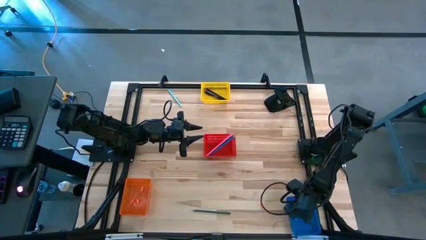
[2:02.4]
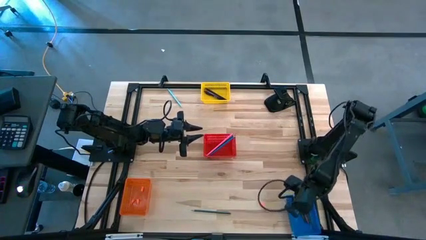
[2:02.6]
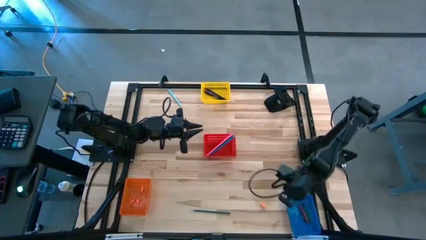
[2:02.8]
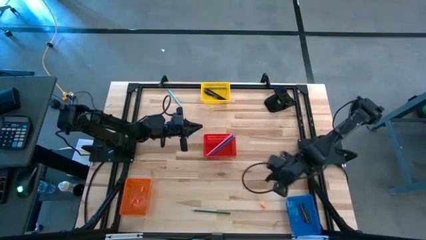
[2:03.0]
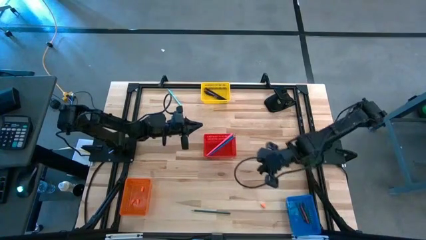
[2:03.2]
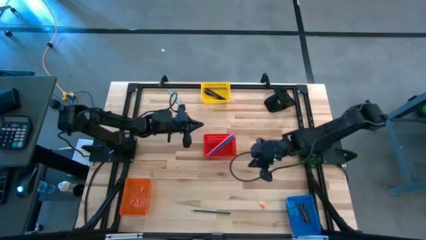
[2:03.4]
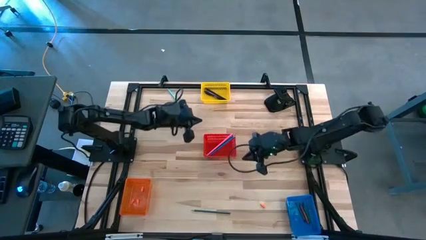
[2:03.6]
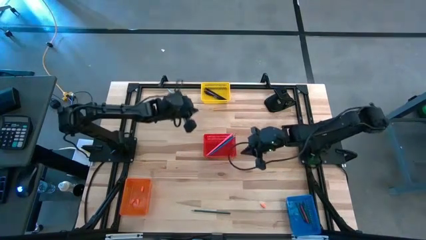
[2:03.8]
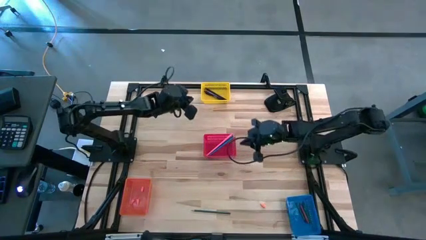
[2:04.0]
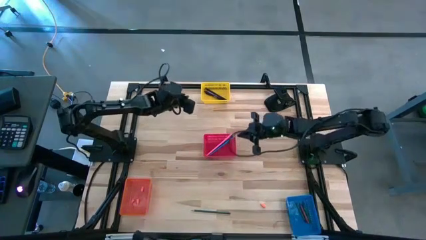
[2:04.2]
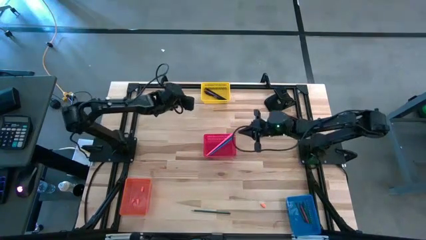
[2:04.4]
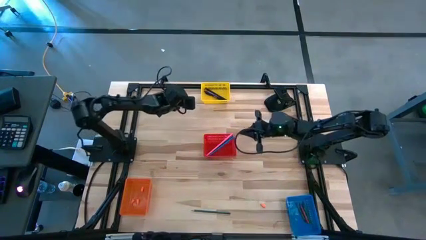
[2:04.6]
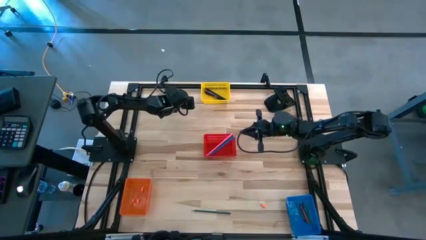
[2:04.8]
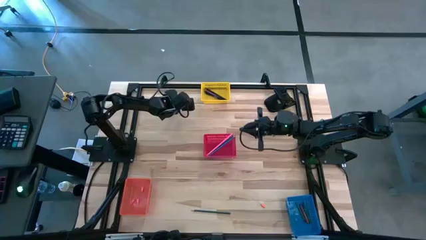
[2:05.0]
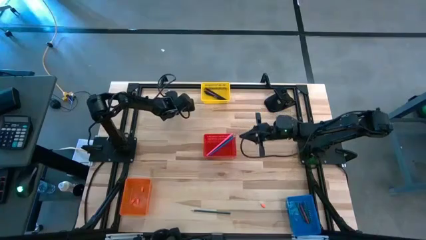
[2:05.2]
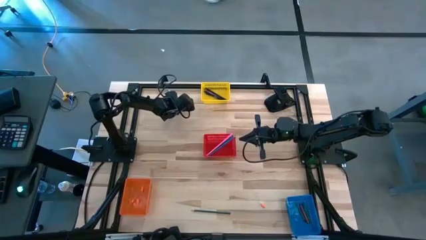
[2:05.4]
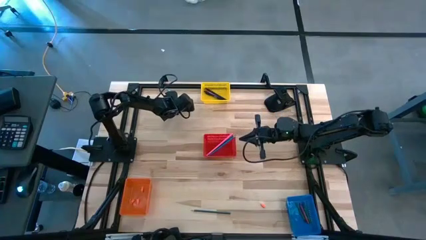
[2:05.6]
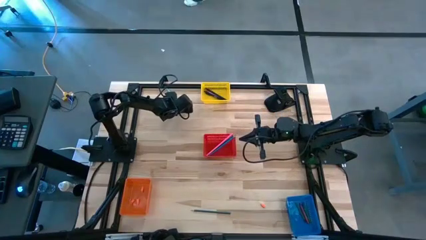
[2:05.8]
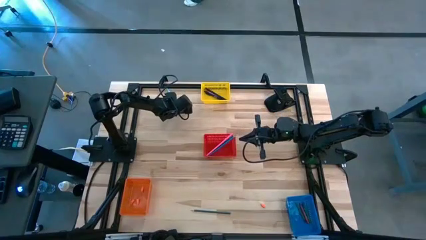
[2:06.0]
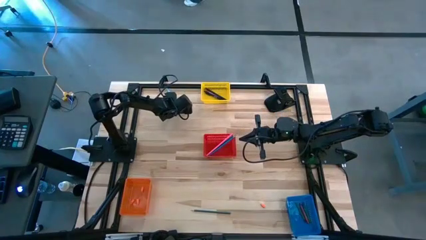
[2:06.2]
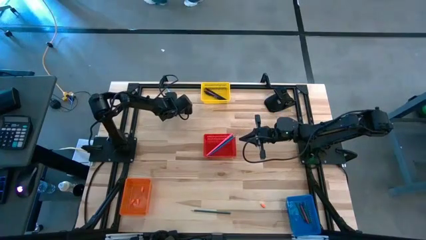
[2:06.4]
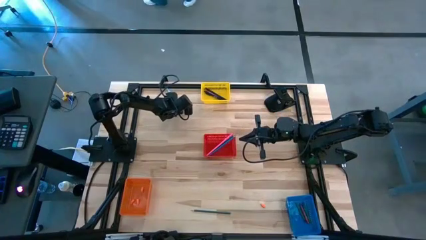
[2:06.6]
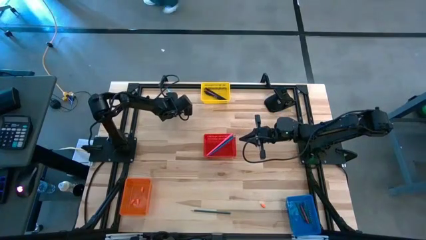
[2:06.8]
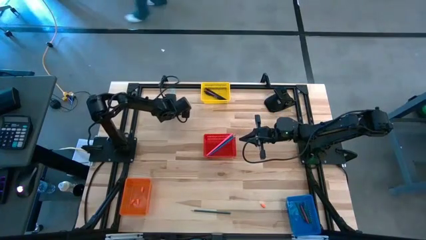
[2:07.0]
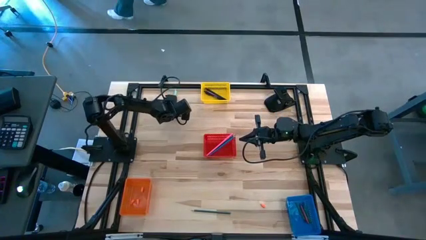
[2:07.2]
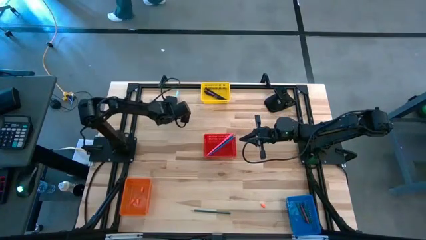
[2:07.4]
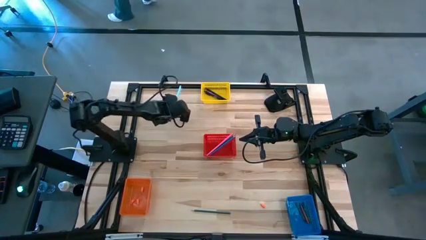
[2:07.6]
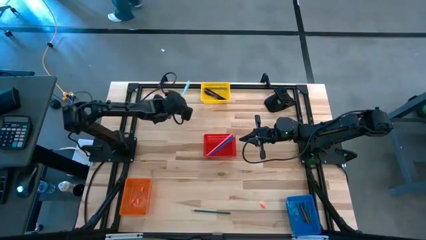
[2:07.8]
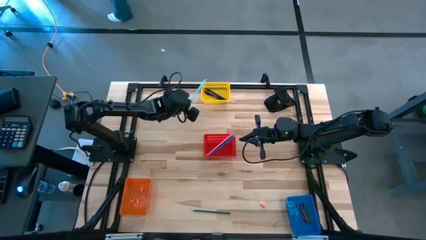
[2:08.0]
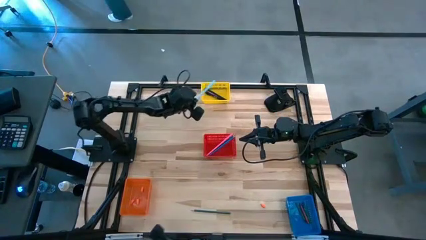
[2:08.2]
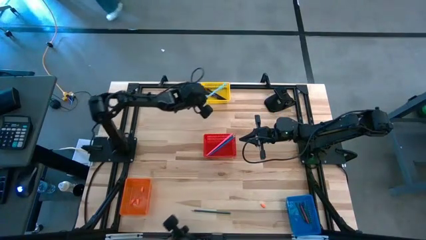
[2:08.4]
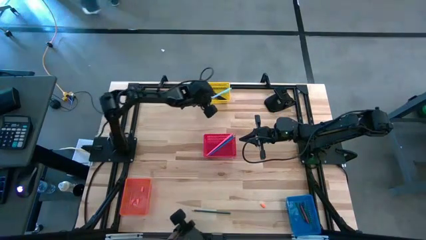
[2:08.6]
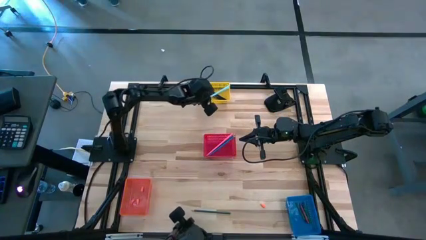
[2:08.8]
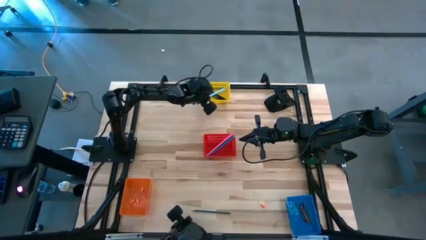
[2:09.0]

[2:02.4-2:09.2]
Task: Sort crayons/erasers/pens/pencils in bins
Put the light blue ball pen into the yellow bin

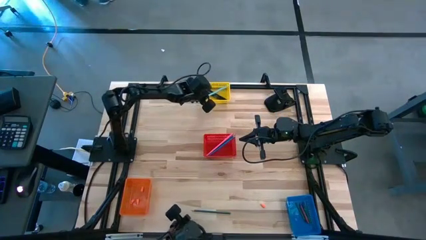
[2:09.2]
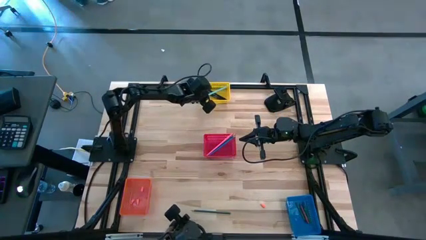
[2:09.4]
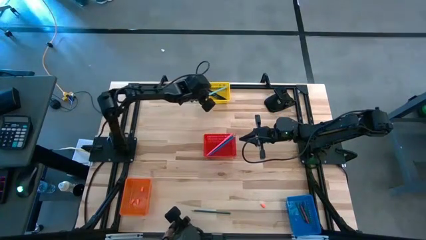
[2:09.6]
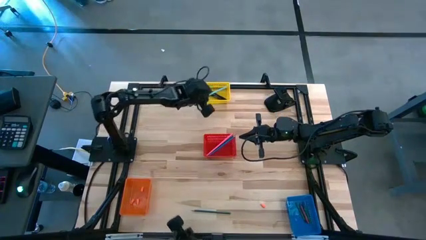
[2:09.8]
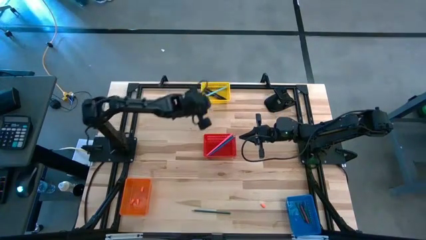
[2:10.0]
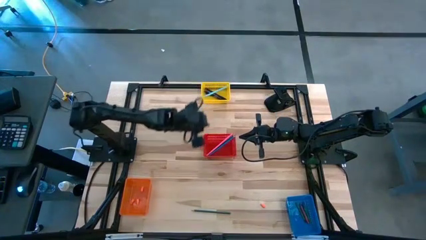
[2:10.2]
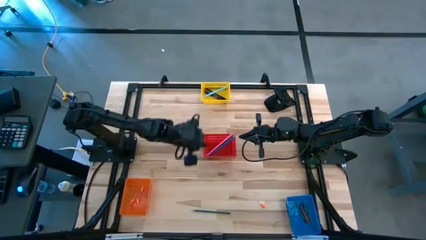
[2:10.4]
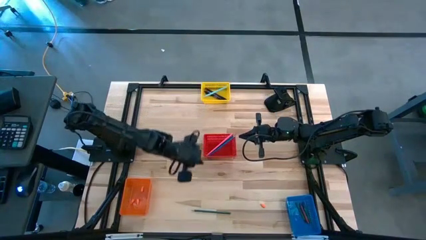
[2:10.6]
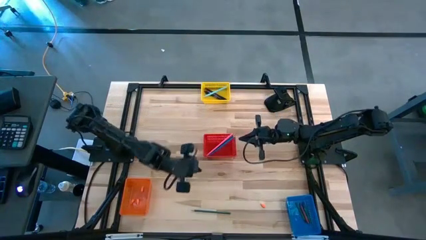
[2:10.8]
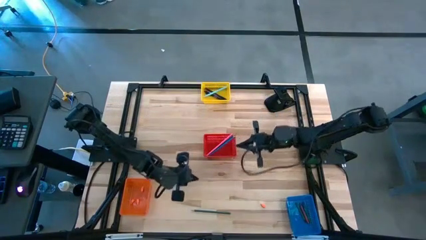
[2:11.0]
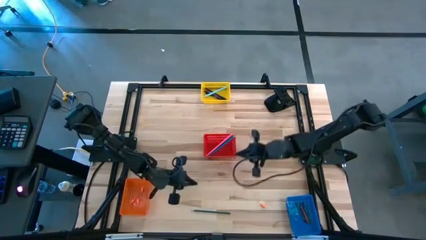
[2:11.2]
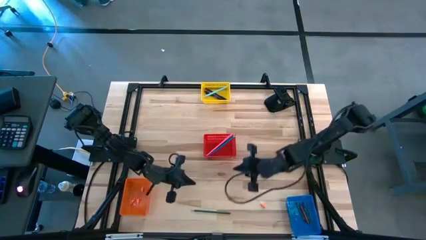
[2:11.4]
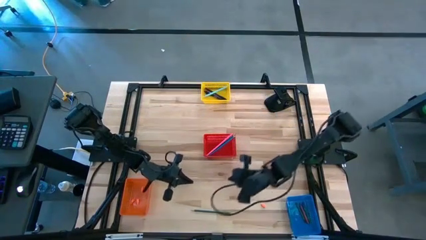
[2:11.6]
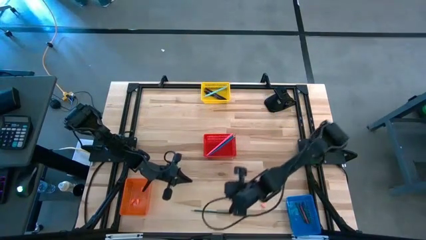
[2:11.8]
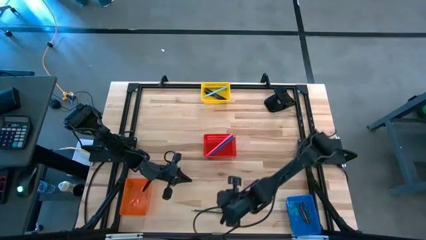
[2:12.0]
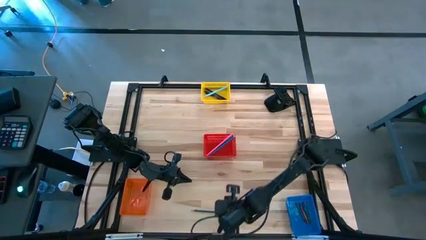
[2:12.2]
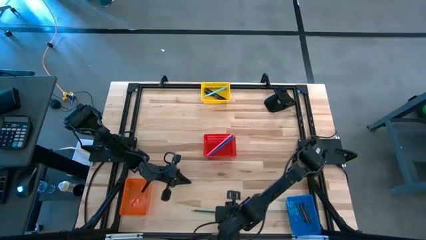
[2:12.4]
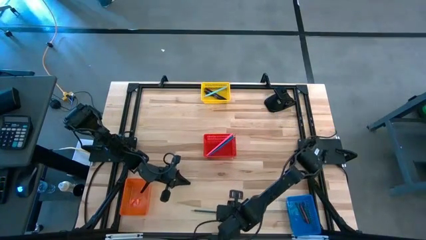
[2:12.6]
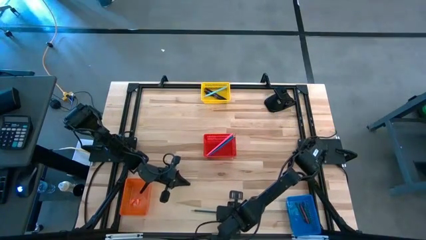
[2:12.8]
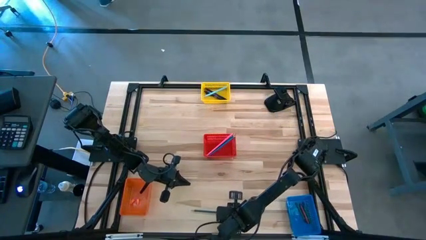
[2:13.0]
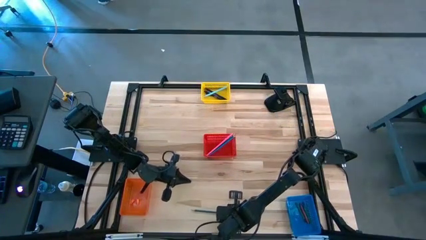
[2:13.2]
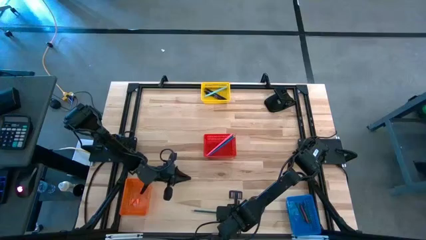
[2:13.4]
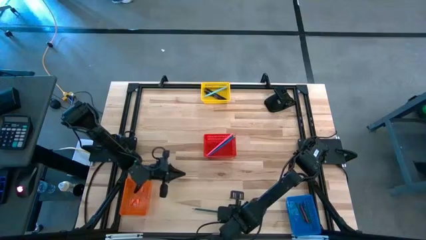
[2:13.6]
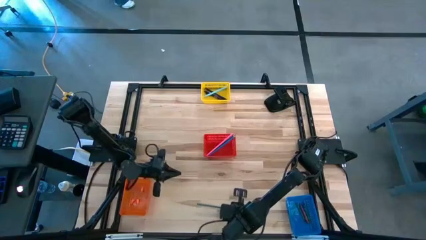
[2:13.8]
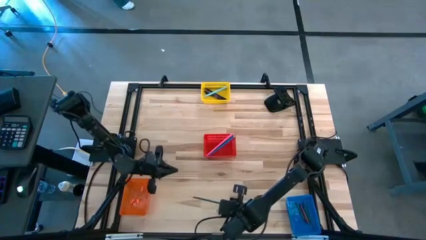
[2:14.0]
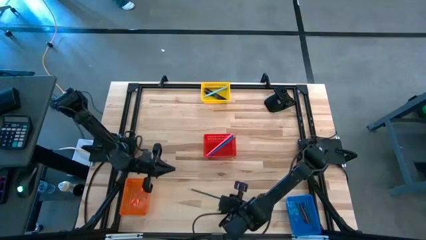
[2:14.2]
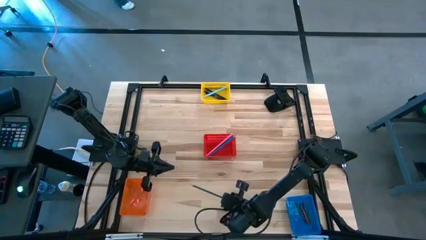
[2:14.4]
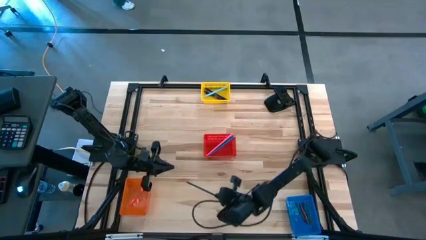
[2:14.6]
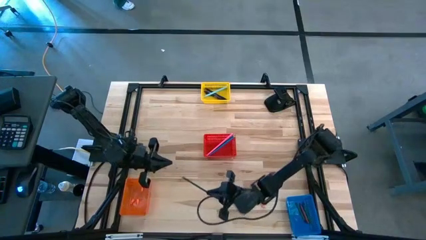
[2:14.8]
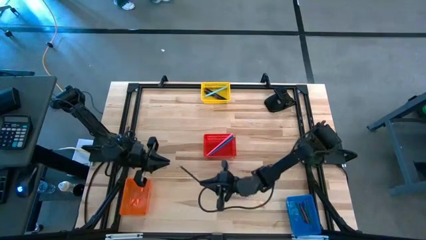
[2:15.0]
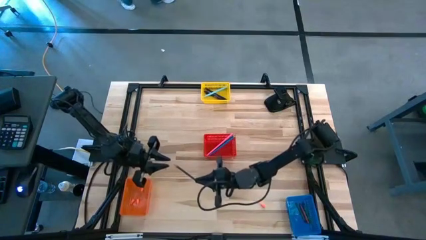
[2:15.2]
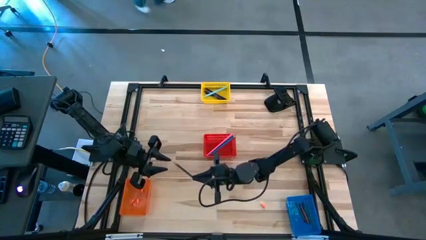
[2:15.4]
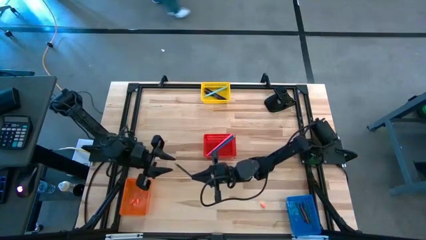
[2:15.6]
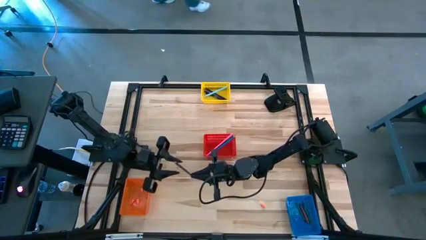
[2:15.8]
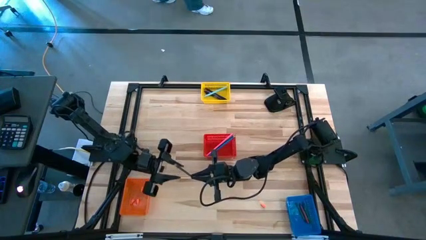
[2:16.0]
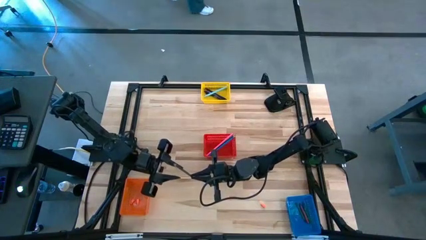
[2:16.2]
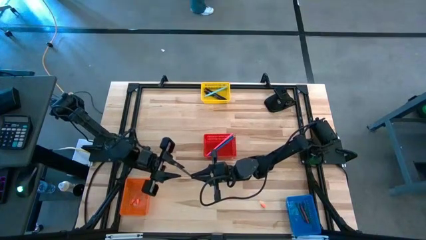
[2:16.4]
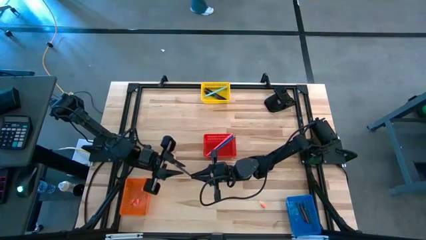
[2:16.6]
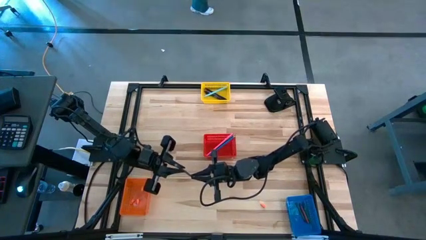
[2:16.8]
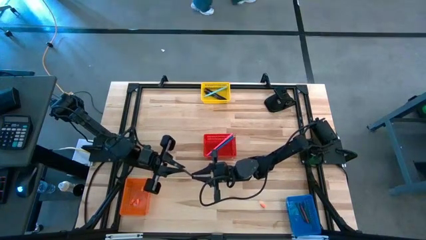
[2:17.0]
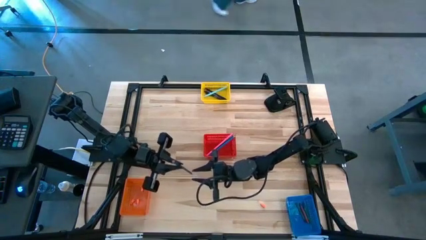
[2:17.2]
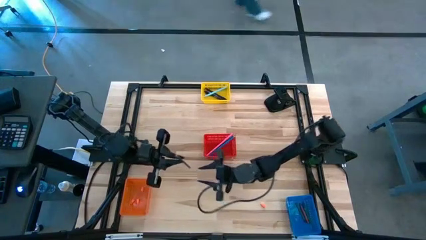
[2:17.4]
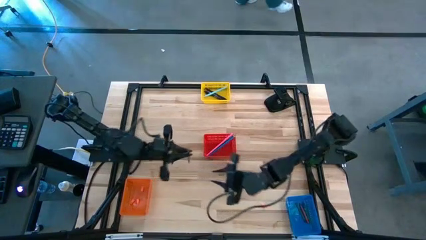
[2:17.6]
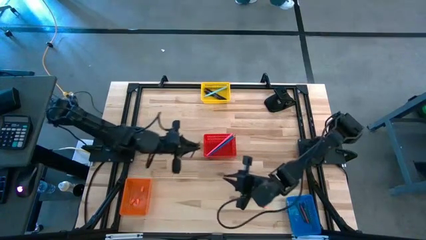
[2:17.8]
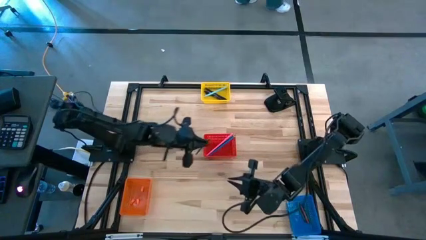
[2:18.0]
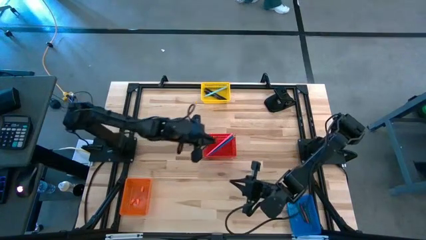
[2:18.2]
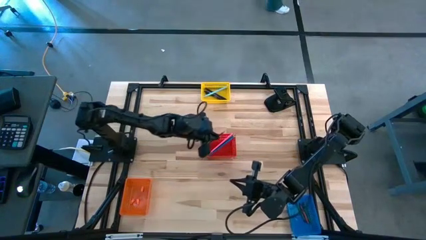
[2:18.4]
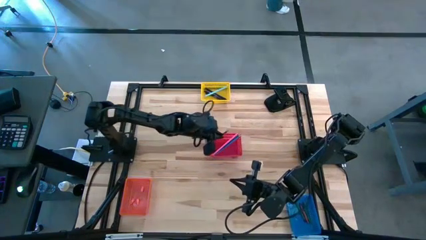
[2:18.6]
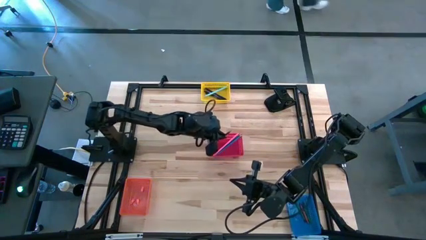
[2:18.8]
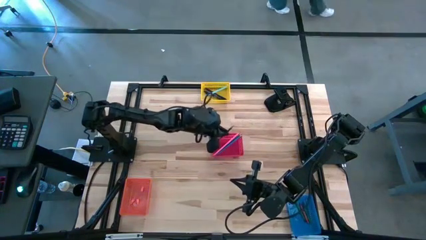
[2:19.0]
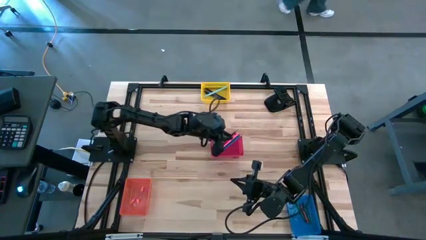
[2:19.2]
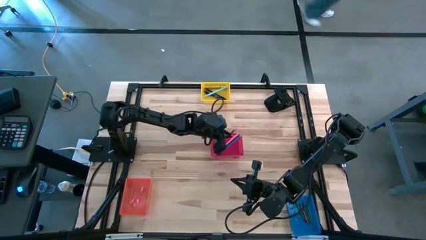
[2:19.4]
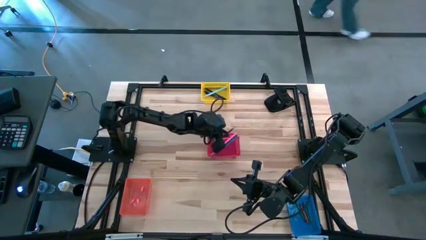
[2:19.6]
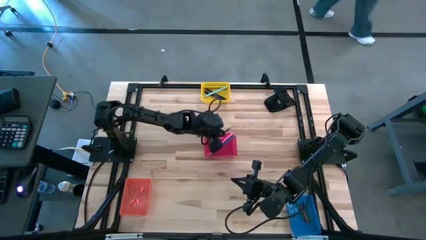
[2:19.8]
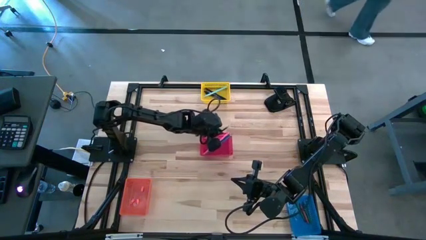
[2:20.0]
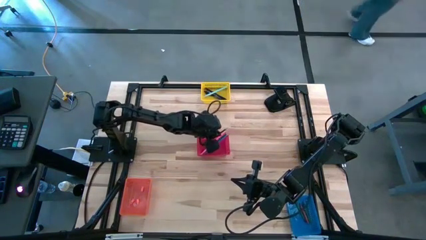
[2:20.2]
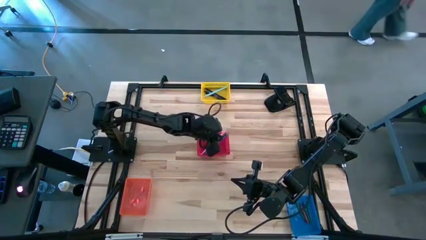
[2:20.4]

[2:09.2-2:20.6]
Put the green pencil into the red bin
